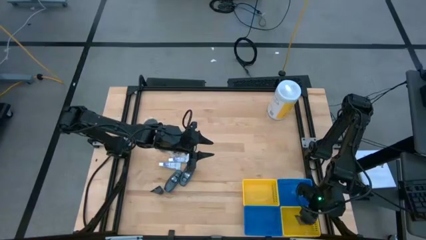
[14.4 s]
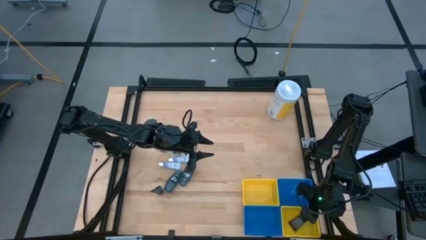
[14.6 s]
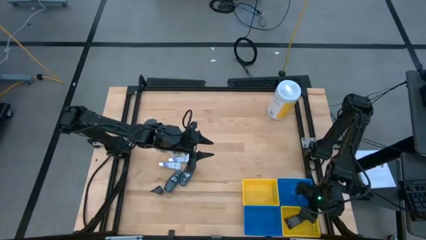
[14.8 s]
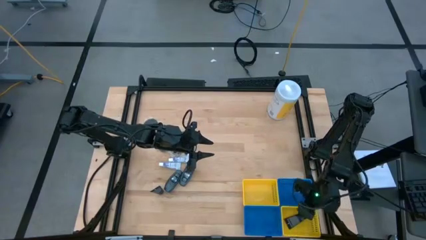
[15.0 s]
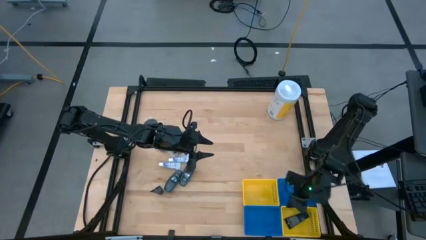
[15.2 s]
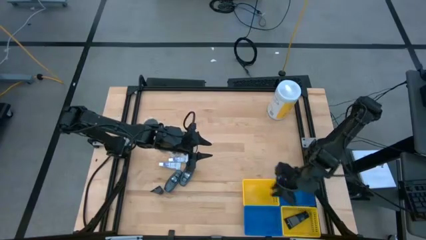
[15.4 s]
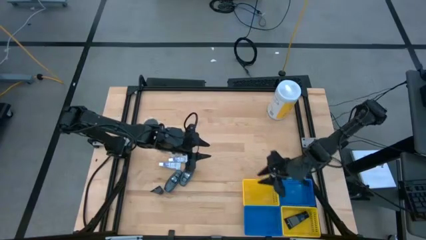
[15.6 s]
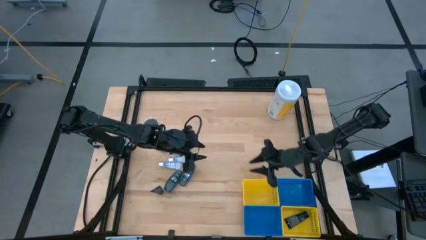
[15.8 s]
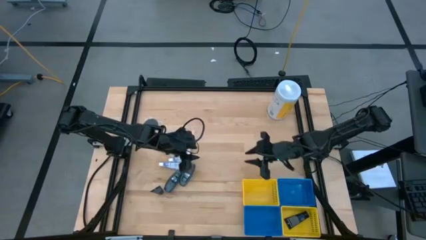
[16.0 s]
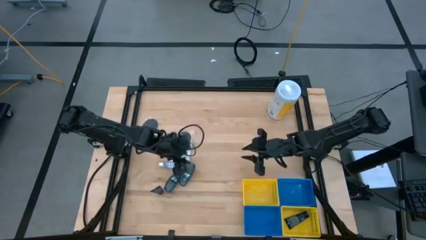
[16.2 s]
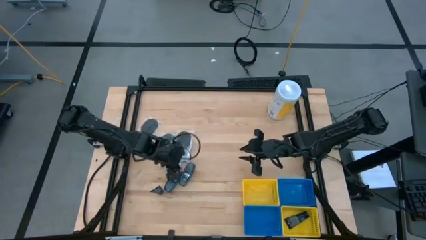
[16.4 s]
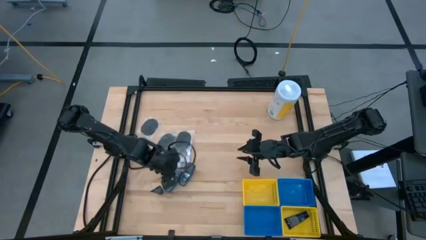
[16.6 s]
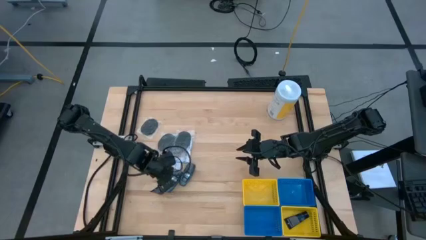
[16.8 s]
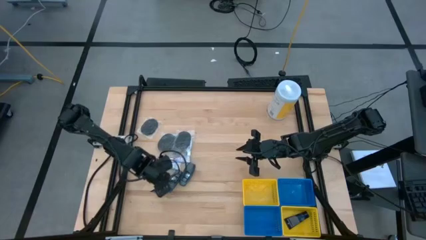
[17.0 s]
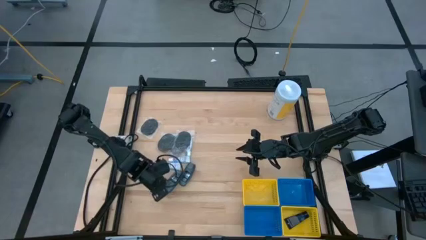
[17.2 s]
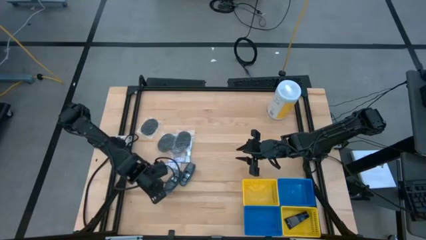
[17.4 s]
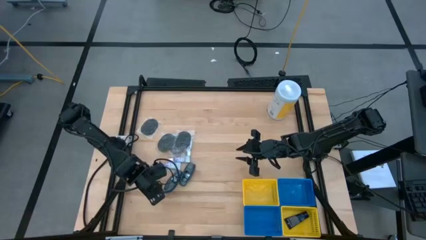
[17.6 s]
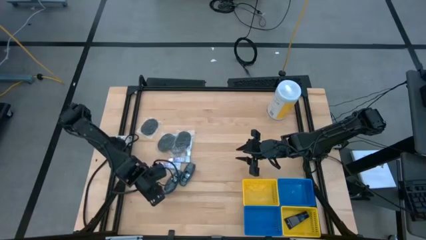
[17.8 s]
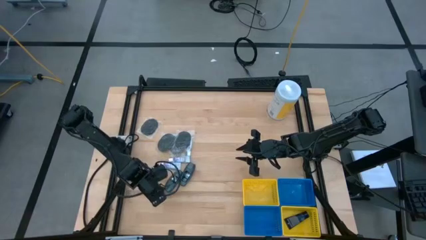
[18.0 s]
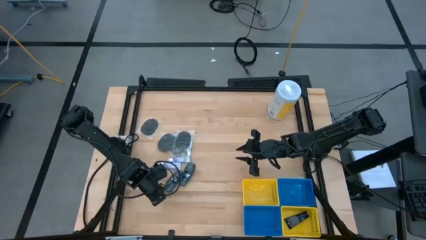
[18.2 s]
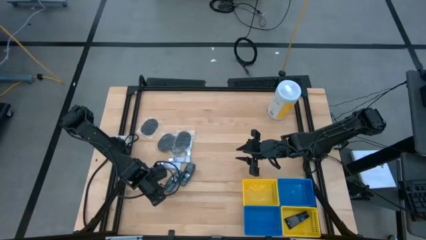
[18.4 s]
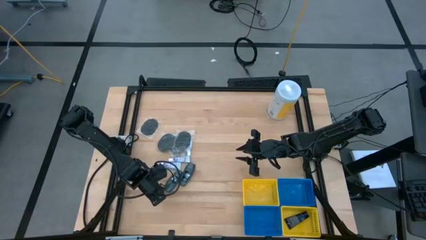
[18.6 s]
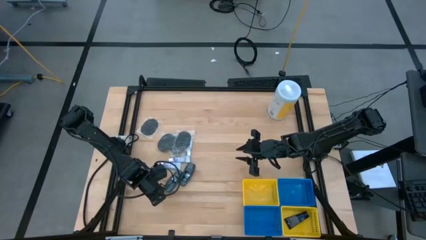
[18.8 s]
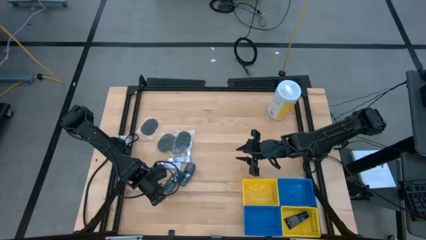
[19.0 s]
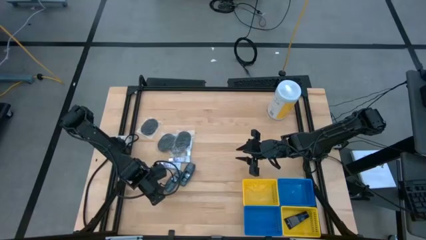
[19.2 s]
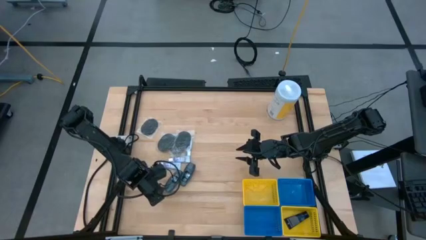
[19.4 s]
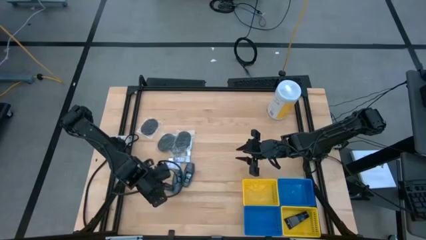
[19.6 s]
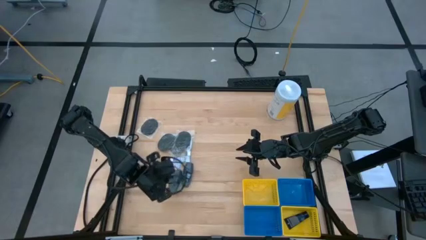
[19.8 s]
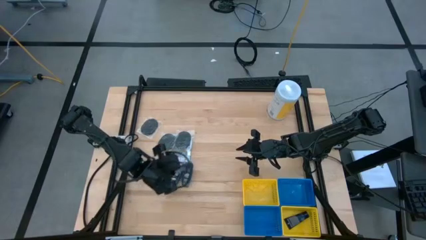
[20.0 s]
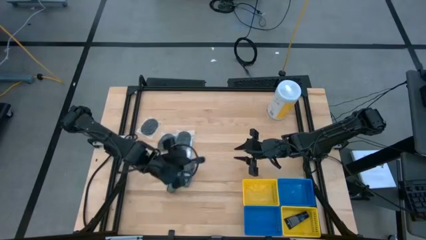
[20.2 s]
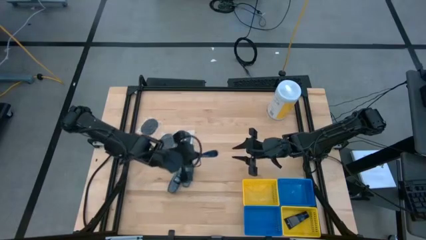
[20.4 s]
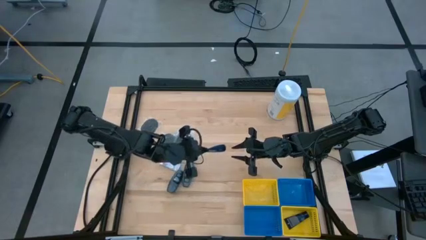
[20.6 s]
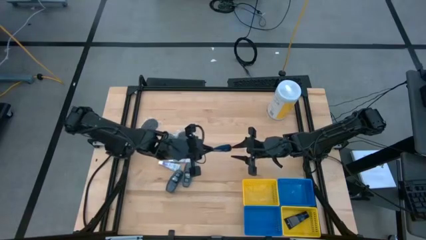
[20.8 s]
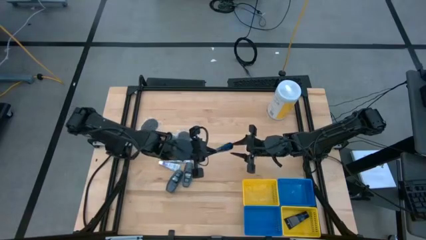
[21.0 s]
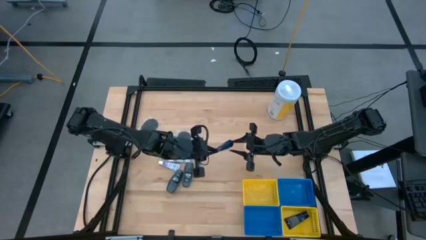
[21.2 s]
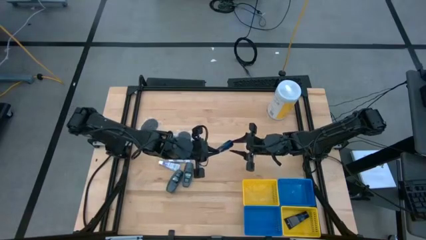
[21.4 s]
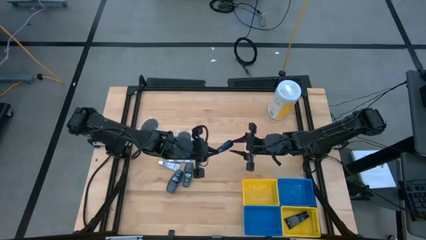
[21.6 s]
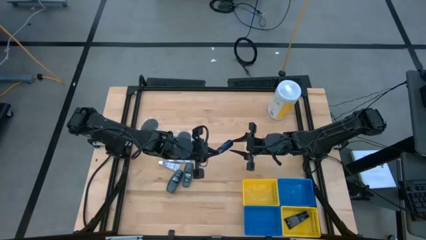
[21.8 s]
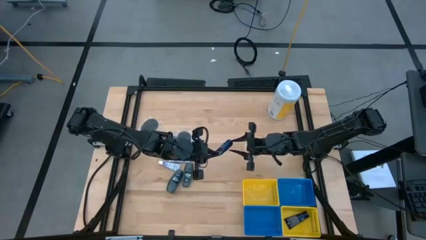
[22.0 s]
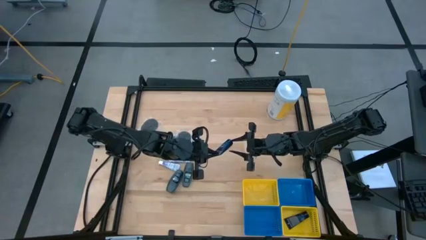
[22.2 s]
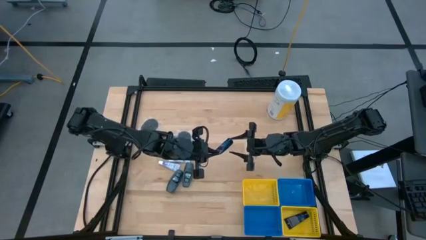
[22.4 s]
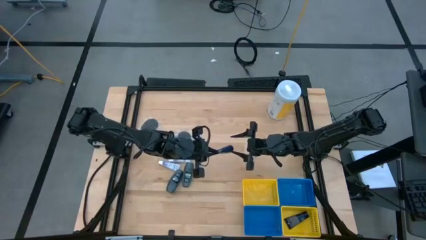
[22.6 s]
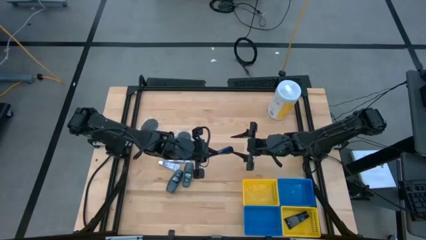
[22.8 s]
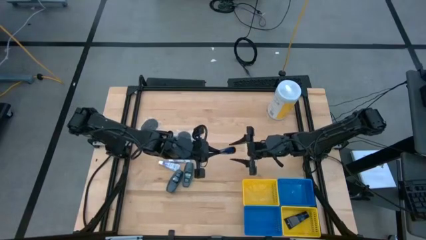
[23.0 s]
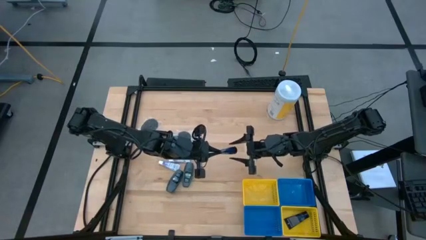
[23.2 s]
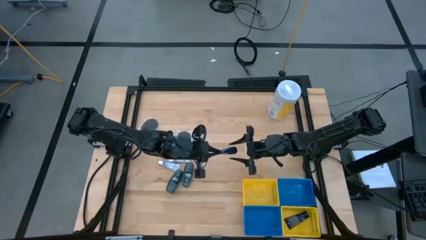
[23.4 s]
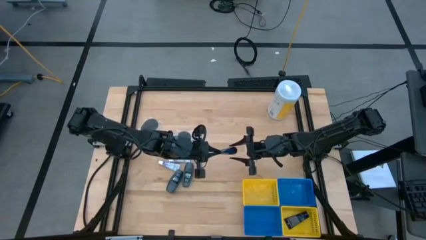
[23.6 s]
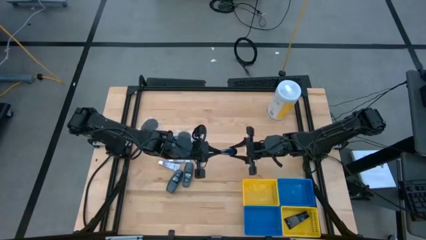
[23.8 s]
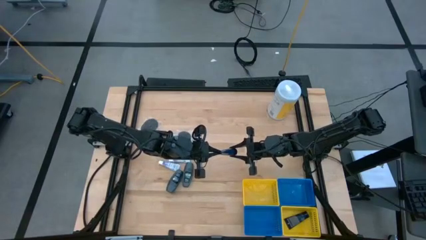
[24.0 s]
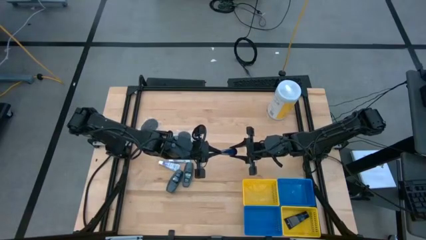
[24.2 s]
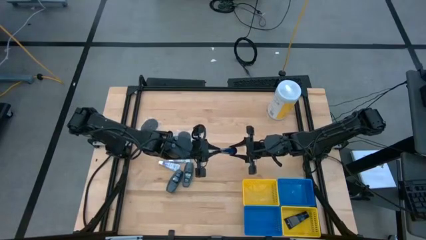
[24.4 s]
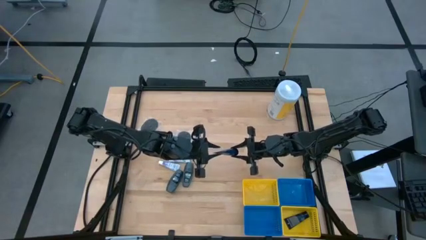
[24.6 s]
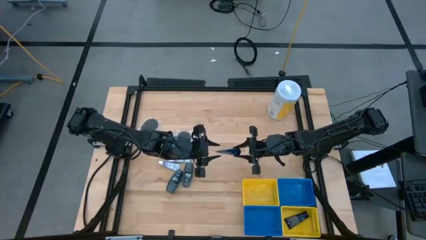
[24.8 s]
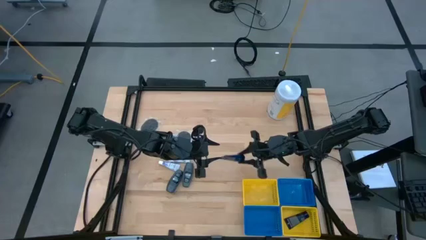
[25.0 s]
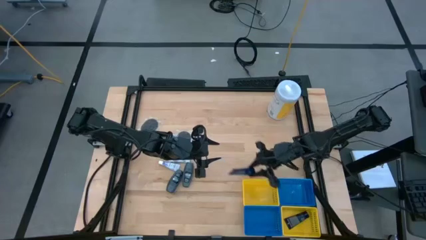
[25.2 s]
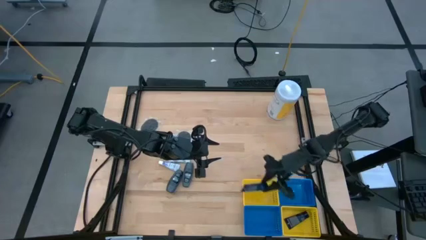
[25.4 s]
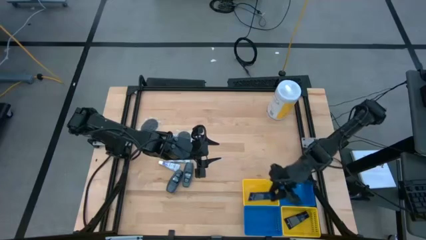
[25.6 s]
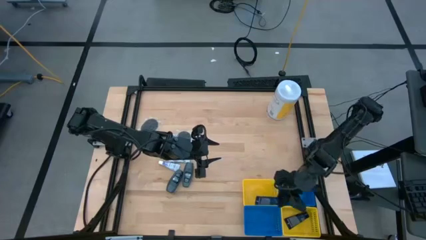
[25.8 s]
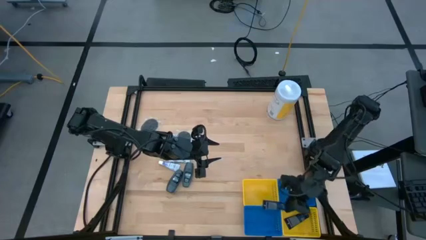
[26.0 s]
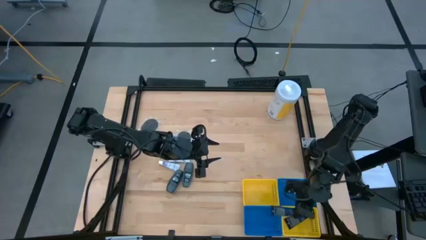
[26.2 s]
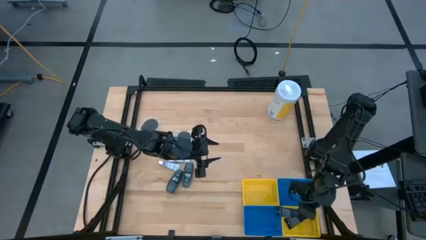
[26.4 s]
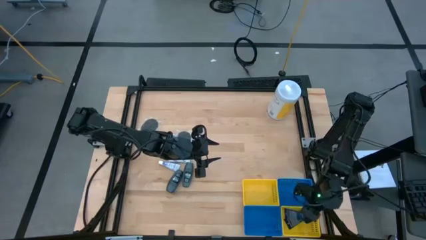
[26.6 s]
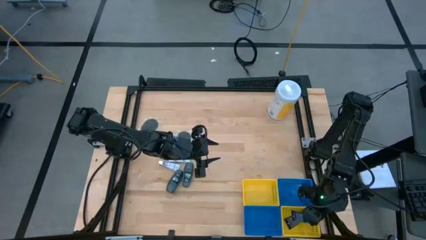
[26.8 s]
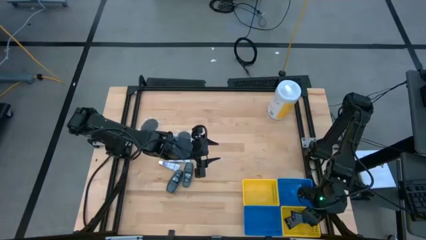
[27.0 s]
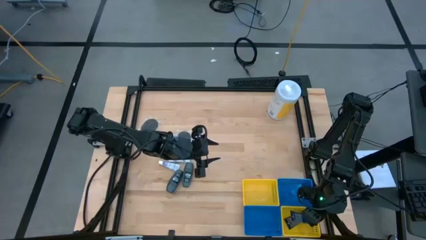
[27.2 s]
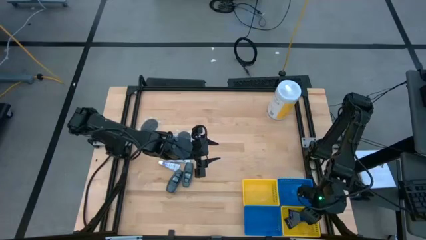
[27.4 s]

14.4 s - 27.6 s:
Task: Pick & Place Travel size toiletries
Put the black shave cream into the bottom yellow bin
